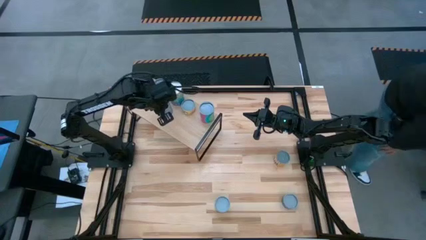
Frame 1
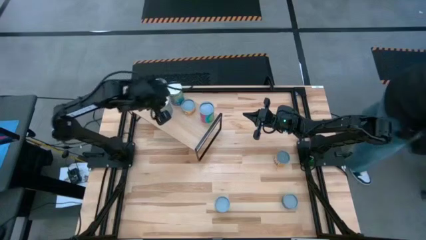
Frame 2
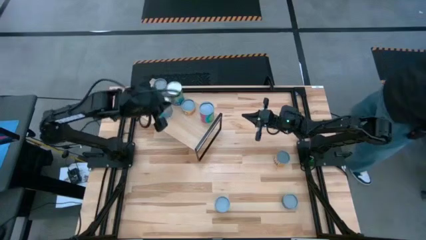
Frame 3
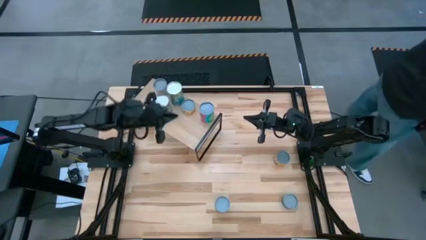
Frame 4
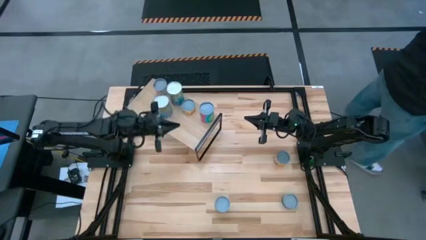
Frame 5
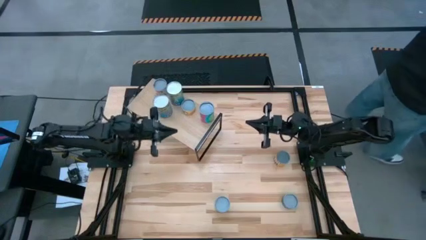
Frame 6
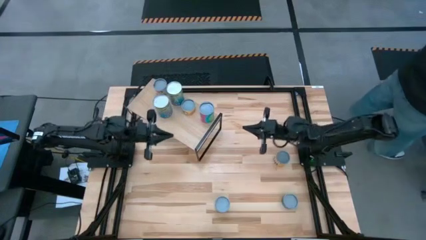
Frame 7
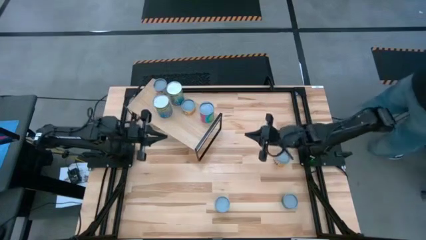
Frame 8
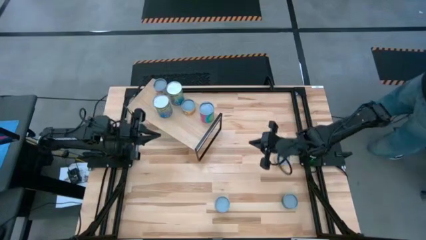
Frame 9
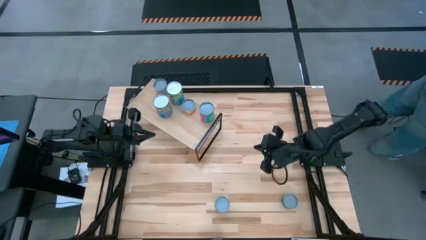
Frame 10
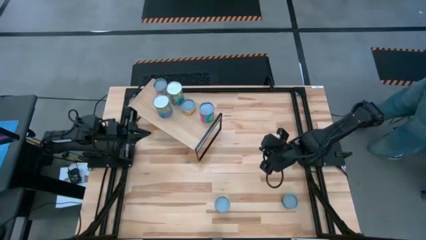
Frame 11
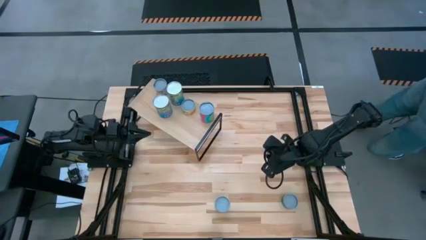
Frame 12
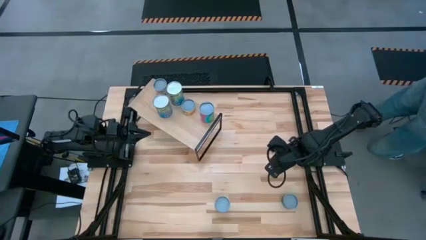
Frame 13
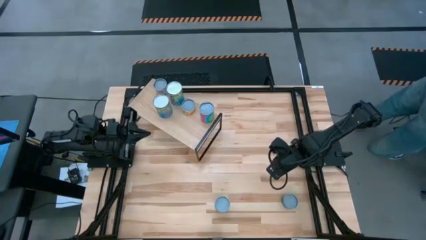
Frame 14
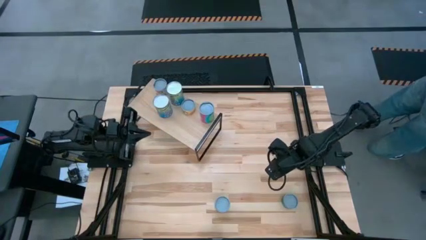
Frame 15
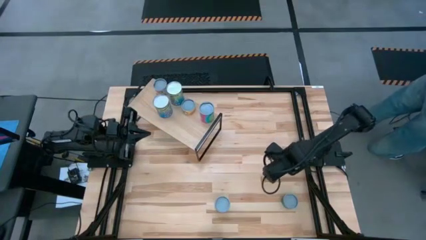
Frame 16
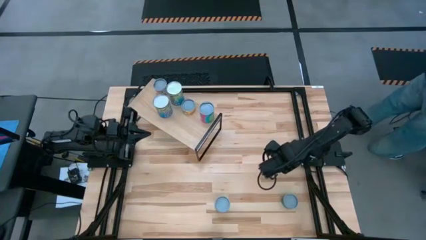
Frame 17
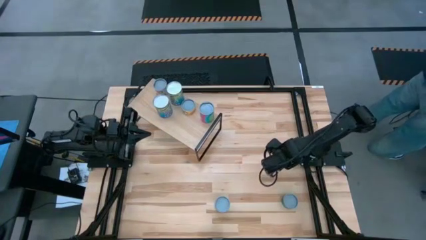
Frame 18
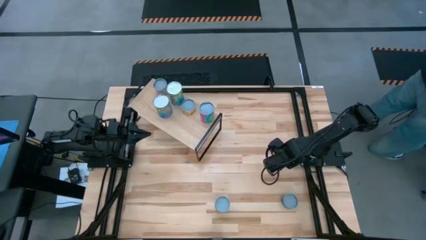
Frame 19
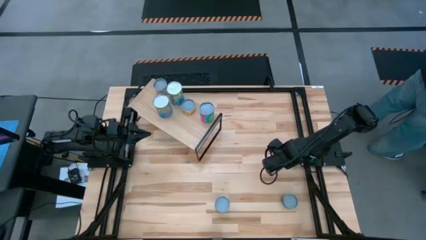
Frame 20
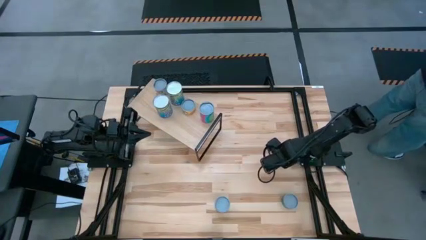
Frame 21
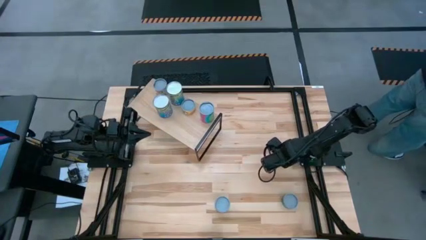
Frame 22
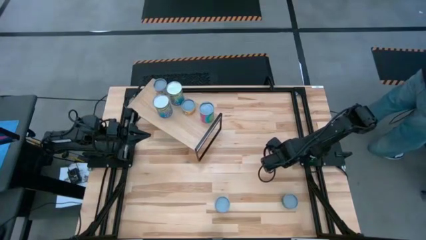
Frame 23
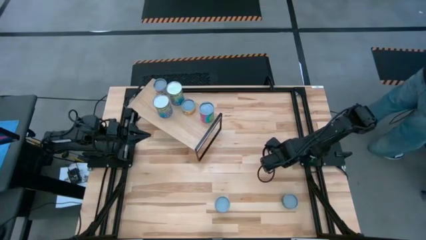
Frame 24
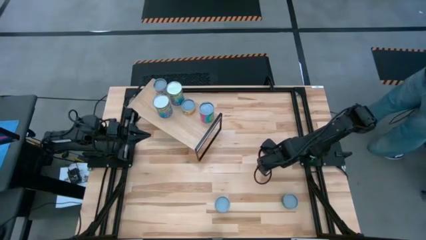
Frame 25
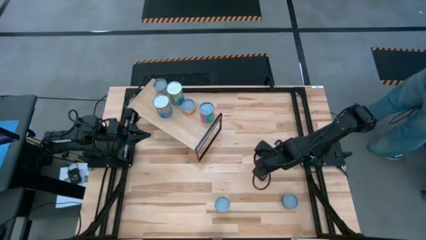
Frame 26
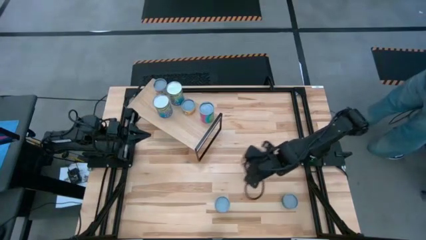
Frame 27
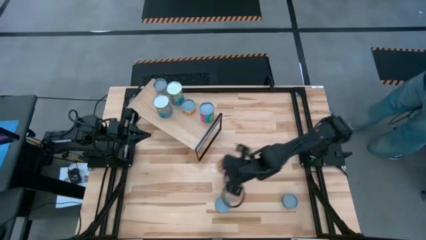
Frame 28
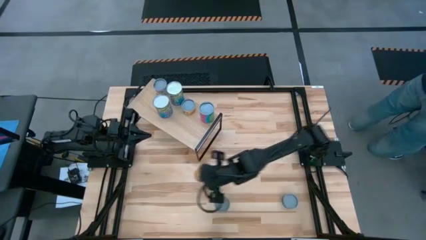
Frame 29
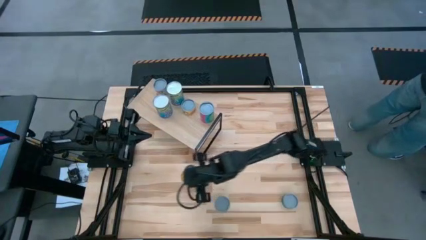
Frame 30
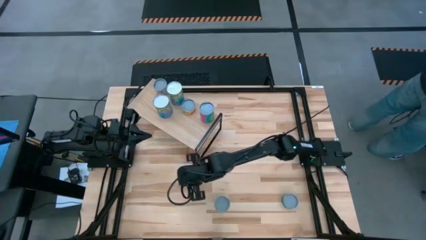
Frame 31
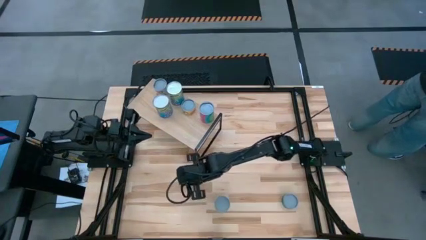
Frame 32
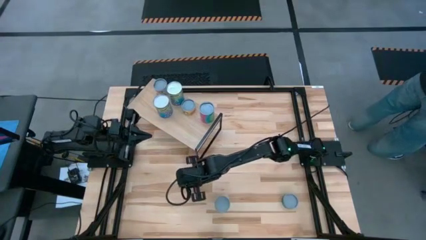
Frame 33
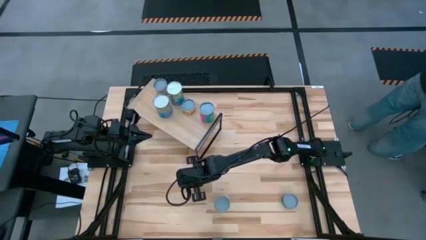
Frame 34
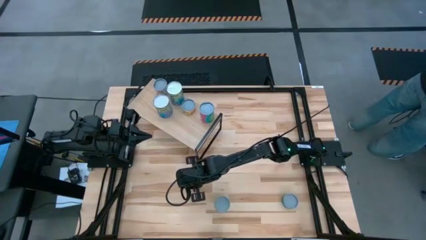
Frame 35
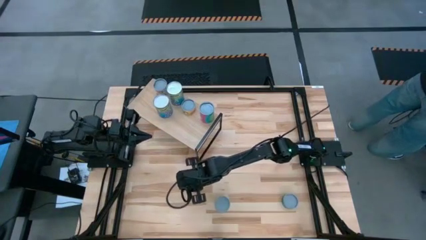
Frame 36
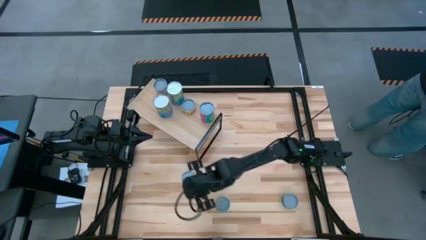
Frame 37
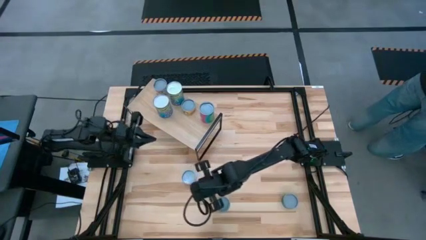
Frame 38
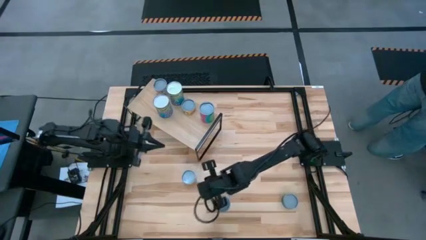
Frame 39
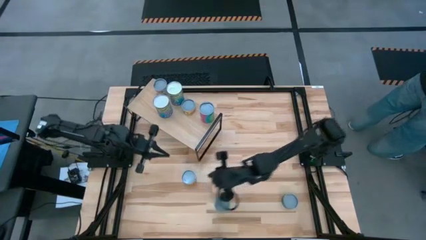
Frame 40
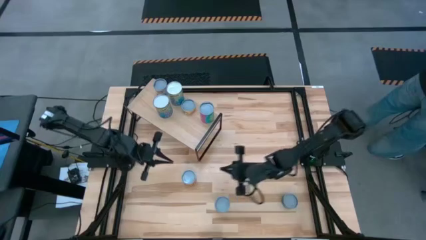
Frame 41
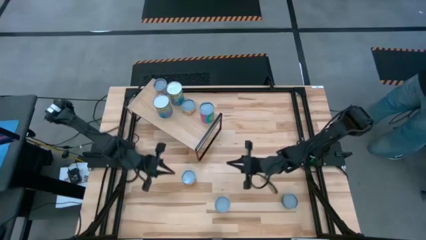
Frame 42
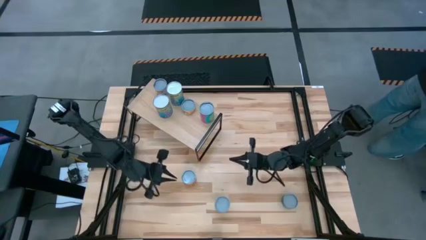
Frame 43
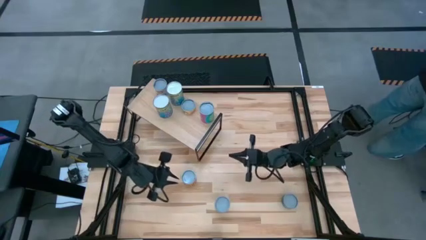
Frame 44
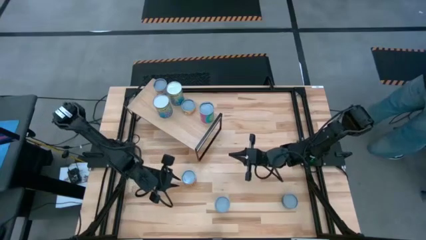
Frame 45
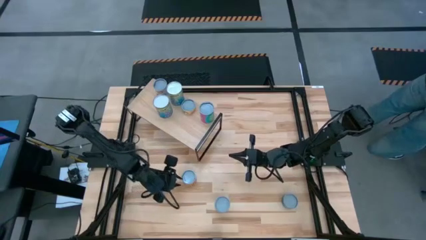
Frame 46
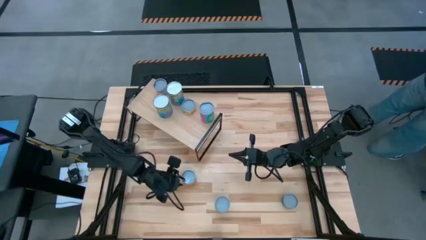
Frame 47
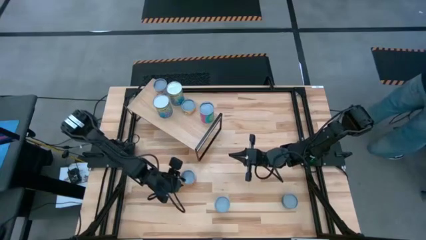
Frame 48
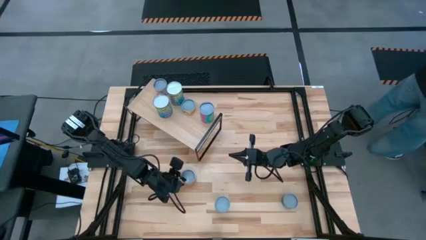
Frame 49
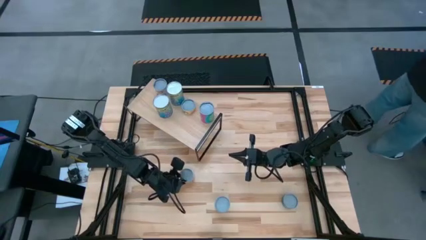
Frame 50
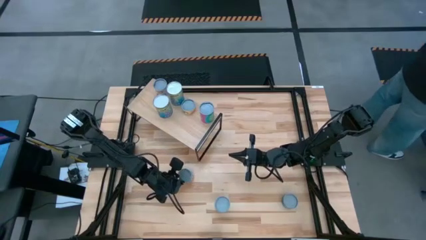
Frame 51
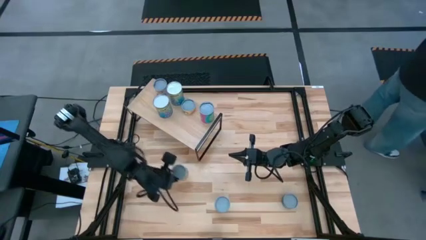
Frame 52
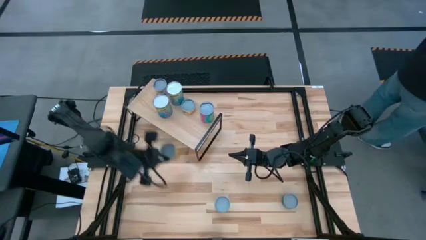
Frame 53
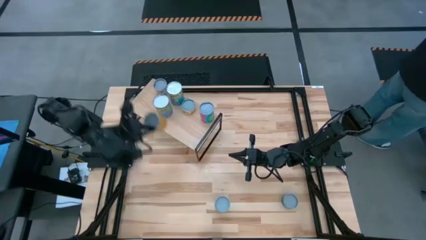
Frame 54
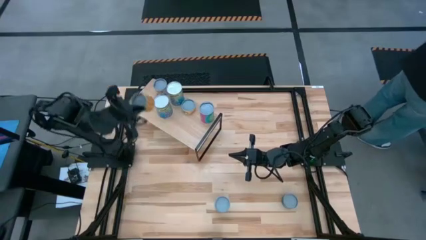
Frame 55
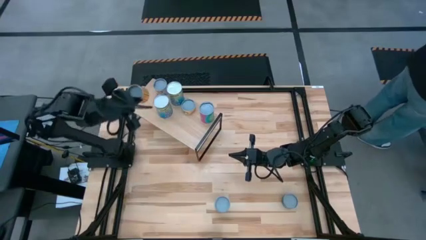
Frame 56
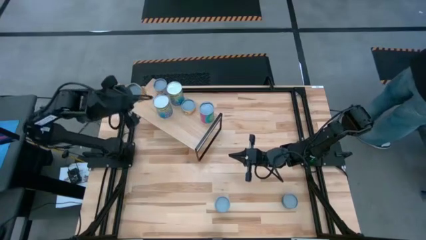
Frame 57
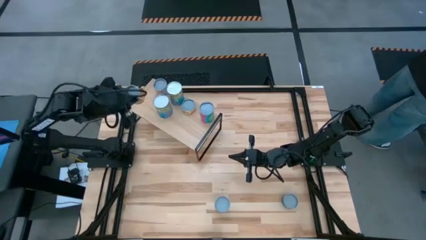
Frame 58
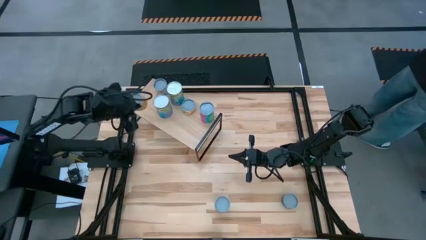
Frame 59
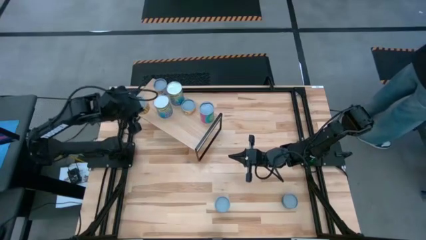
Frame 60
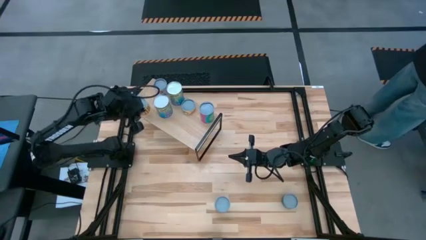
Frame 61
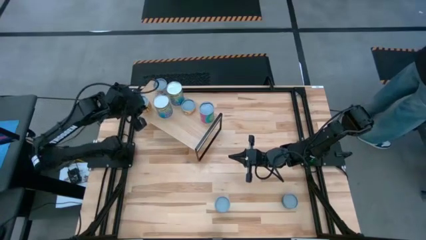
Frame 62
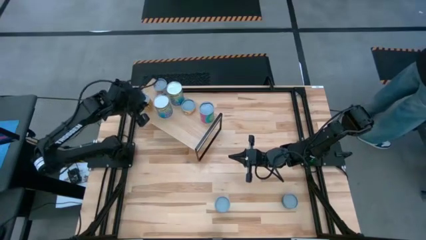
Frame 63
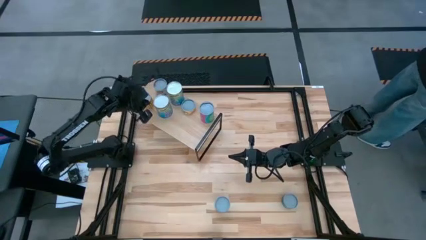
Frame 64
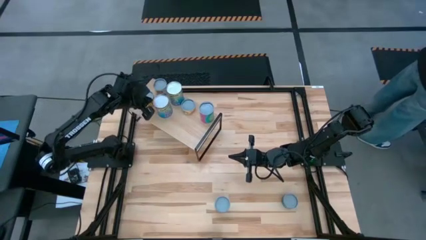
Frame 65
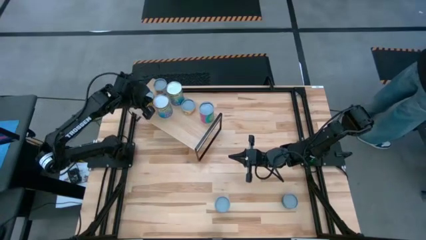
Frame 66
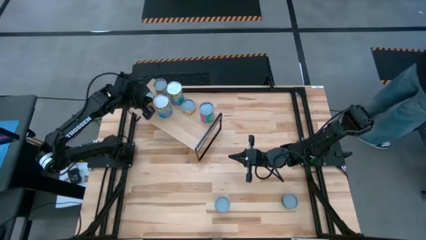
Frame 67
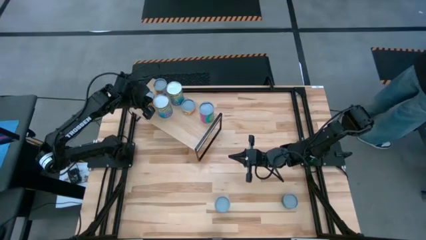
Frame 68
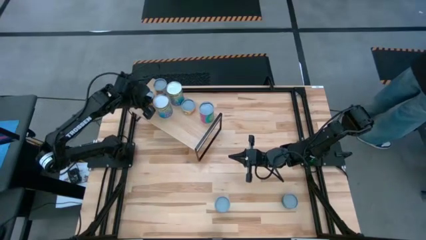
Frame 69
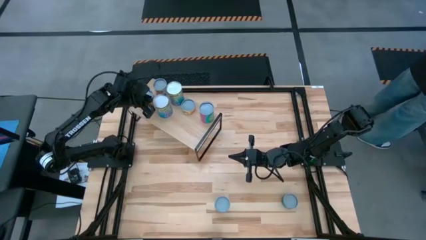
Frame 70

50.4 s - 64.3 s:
Task: Pick and place cans onto a shelf
Put the canned black beans on the shelf

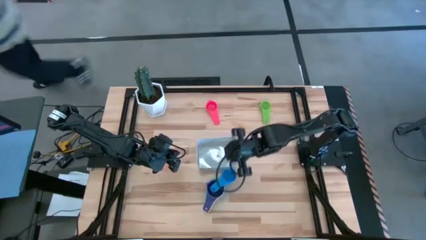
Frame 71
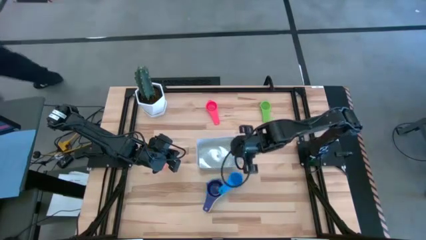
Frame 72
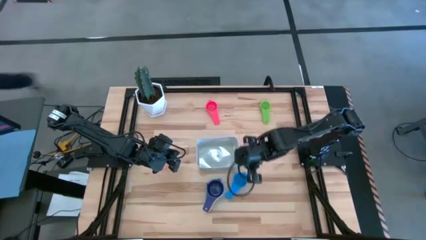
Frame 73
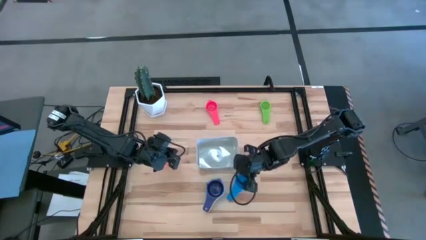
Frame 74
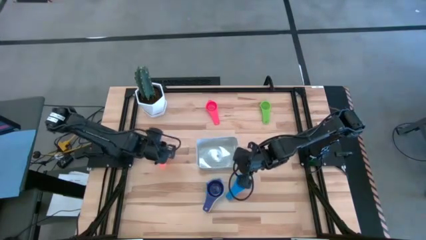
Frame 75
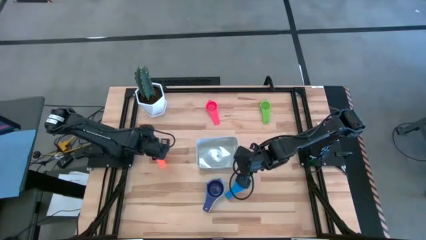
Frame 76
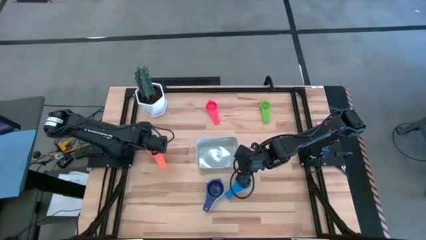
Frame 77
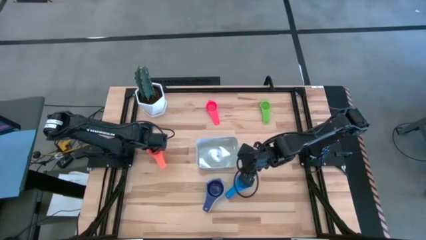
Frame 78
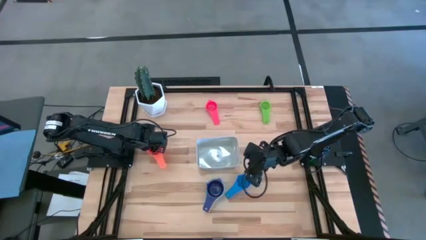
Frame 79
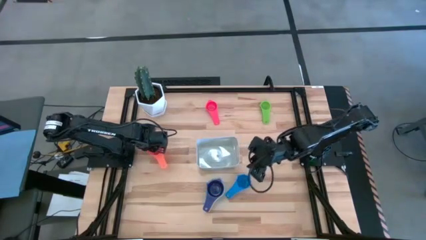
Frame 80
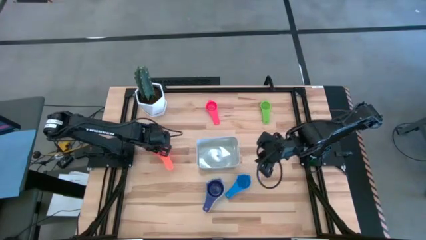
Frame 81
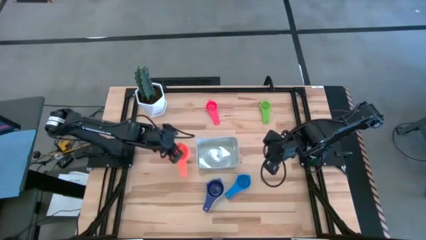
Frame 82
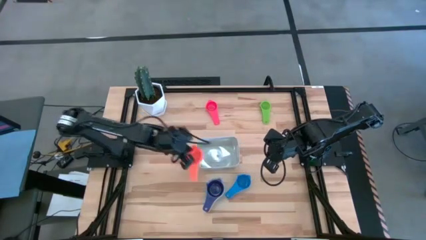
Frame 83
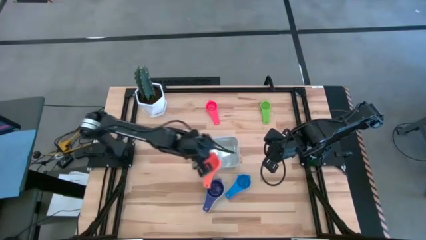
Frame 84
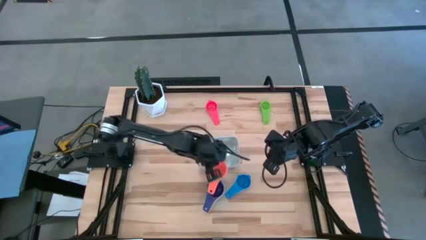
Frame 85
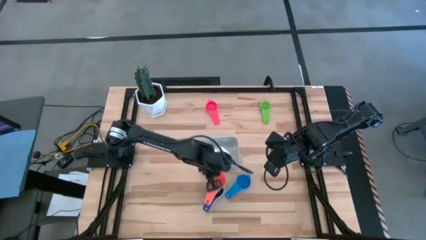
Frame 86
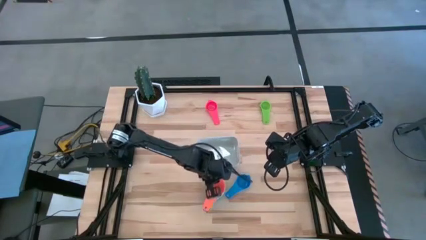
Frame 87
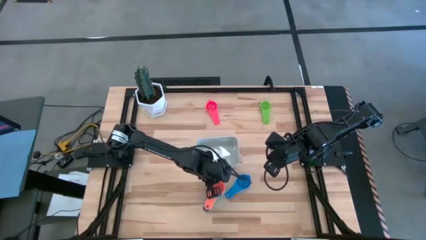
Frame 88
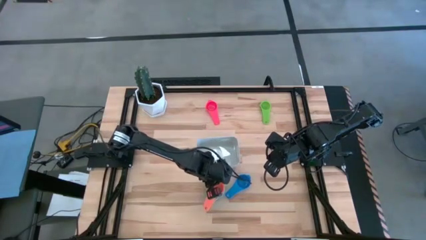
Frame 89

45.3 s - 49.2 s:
Task: Nest measuring cups in basket
Stack the orange measuring cup on top of the dark blue measuring cup
